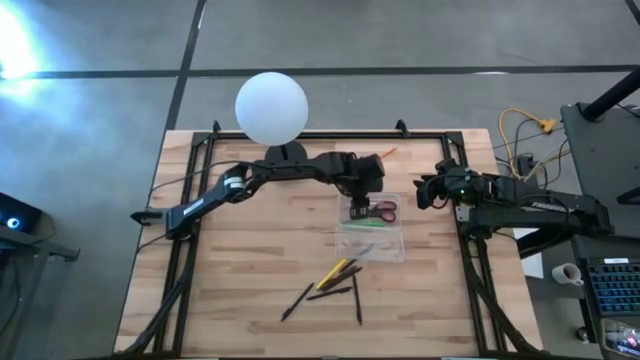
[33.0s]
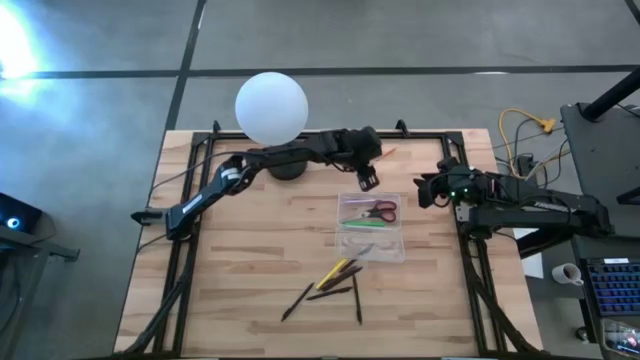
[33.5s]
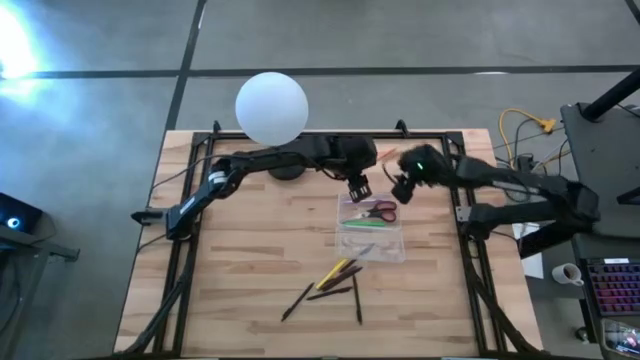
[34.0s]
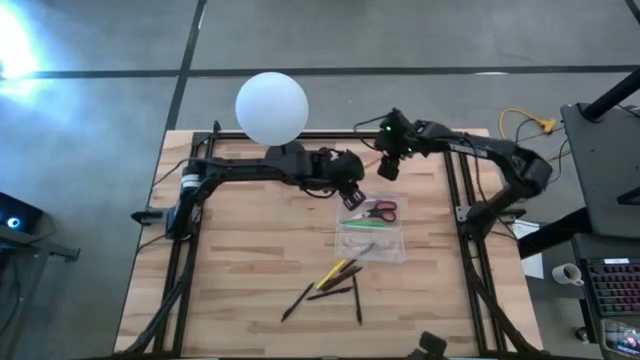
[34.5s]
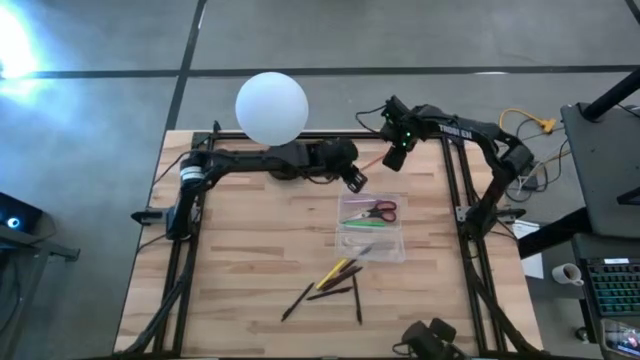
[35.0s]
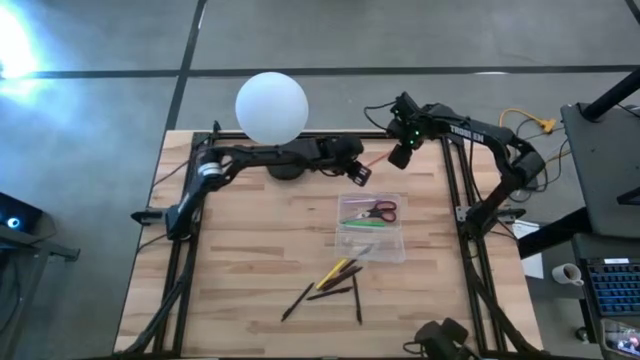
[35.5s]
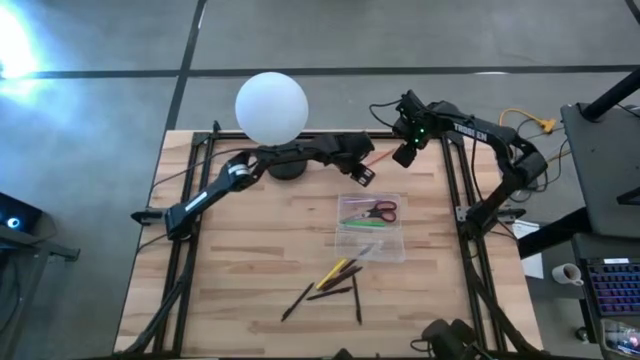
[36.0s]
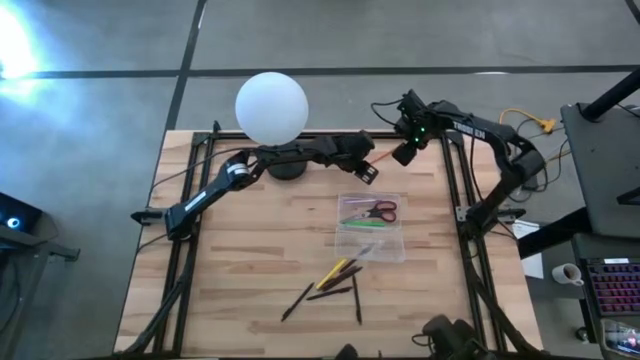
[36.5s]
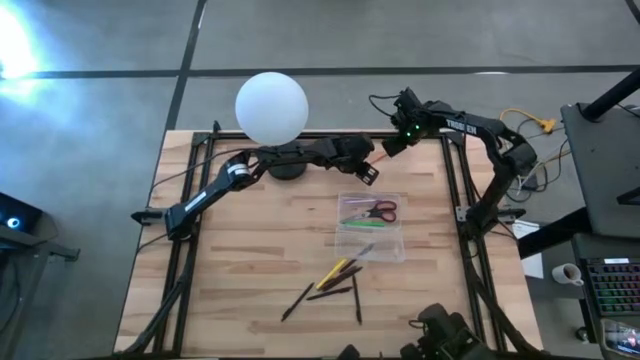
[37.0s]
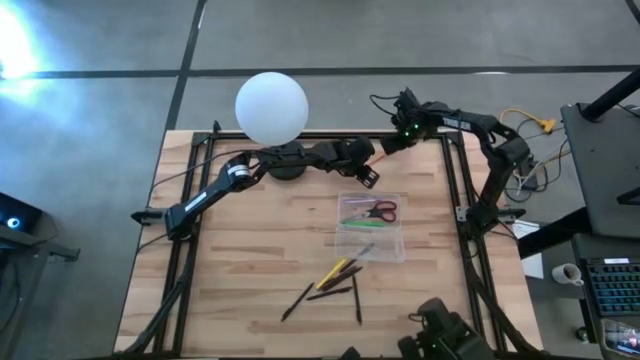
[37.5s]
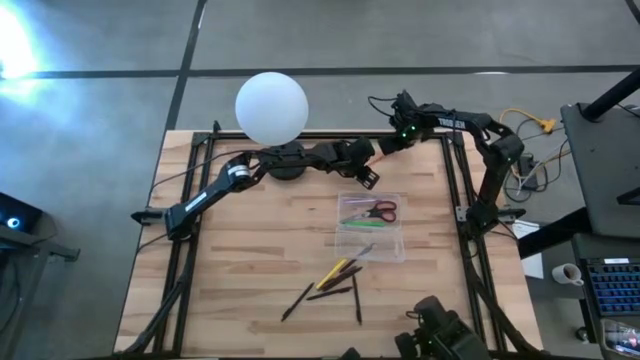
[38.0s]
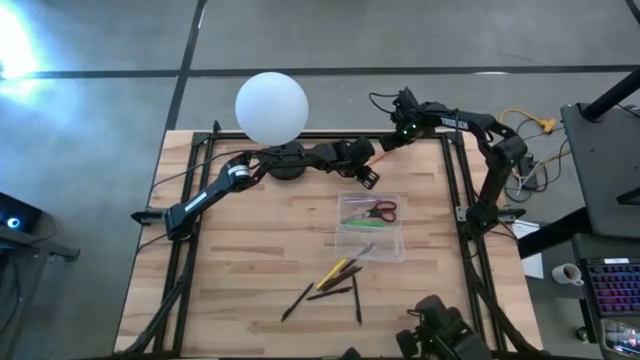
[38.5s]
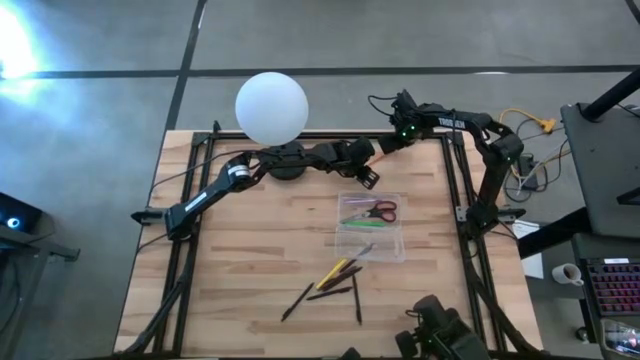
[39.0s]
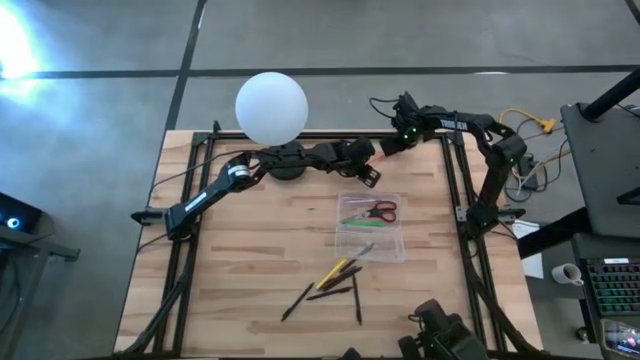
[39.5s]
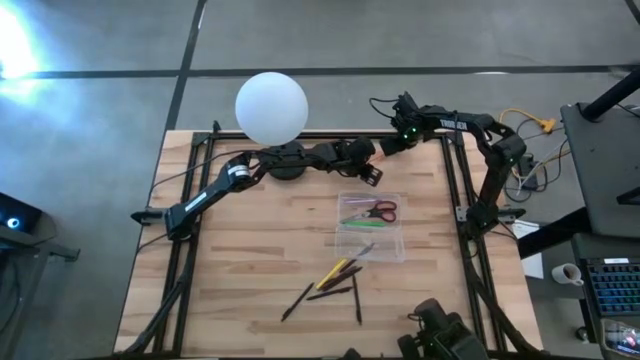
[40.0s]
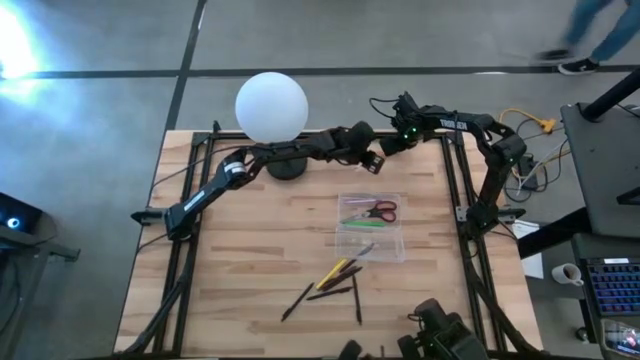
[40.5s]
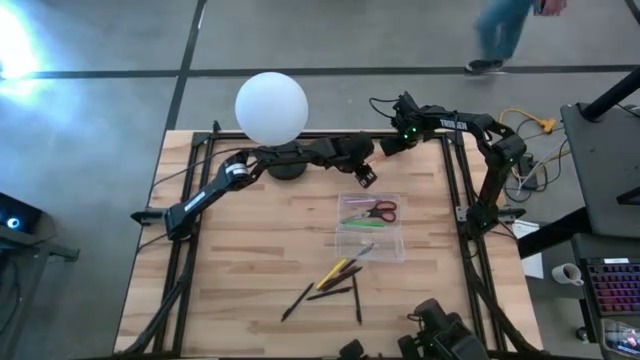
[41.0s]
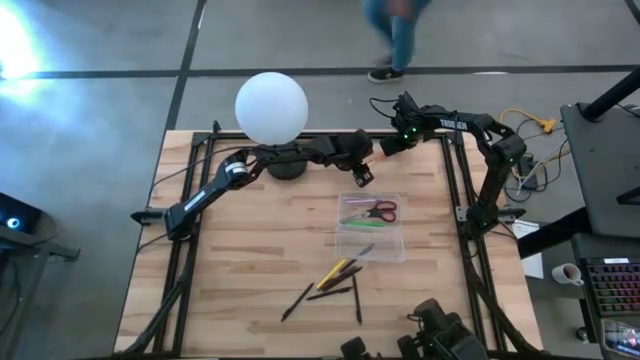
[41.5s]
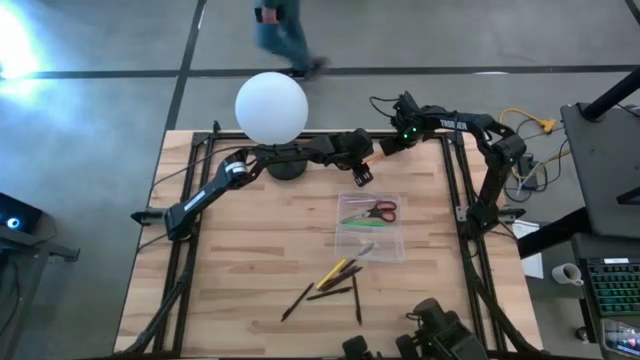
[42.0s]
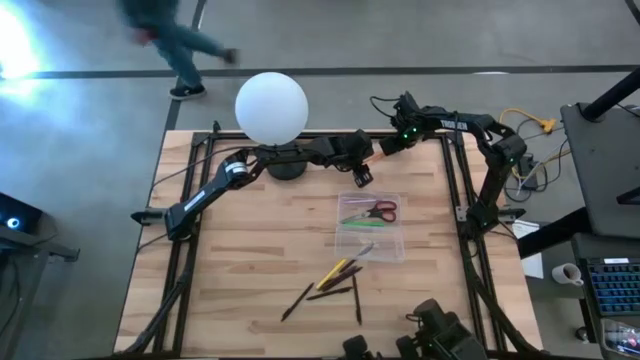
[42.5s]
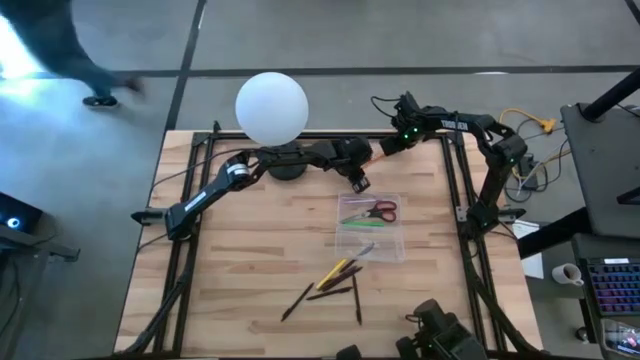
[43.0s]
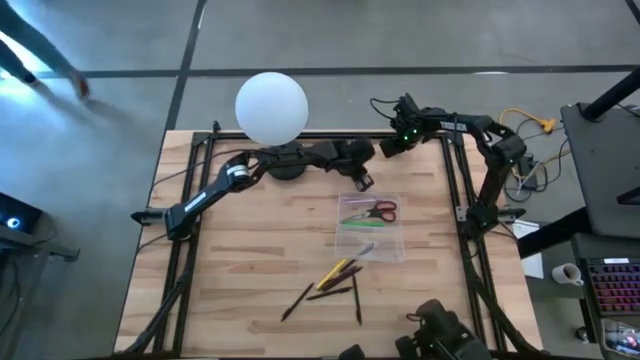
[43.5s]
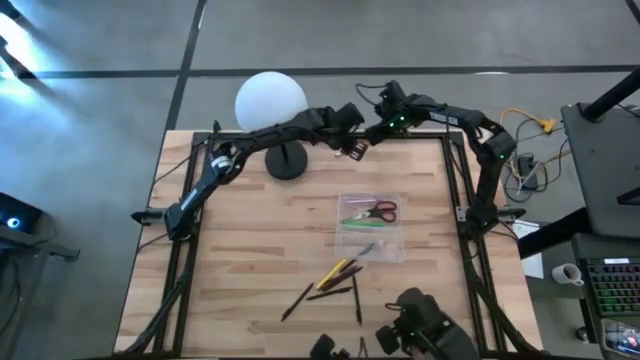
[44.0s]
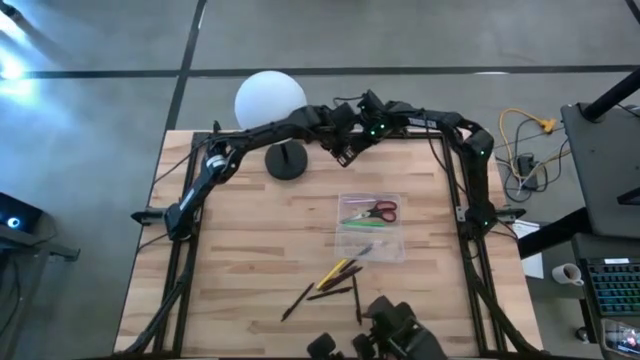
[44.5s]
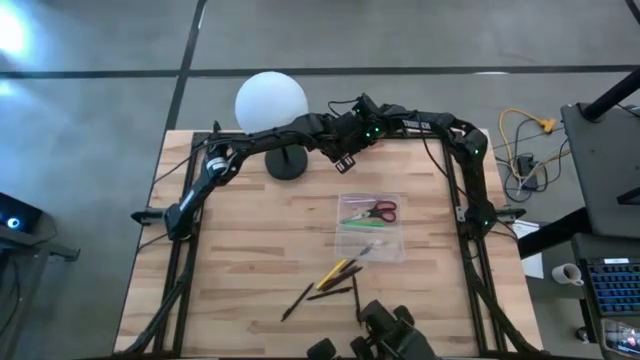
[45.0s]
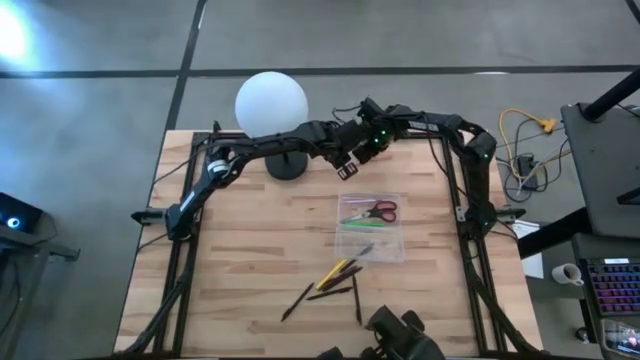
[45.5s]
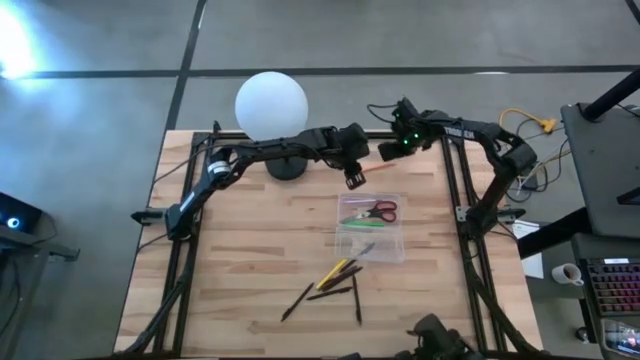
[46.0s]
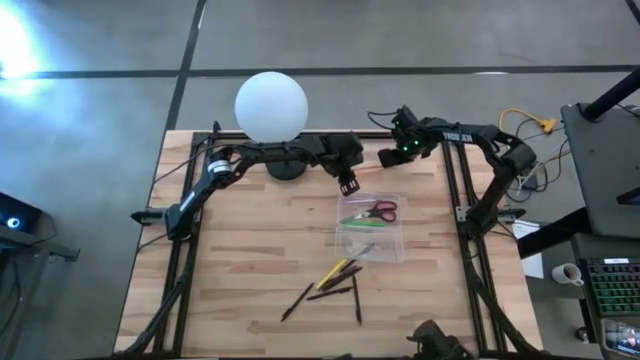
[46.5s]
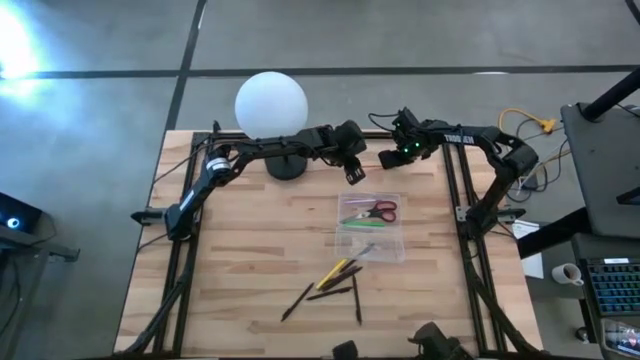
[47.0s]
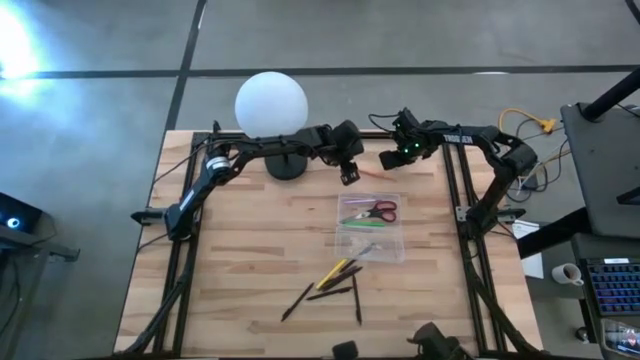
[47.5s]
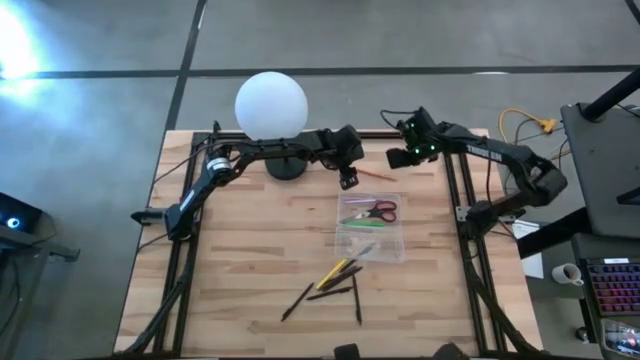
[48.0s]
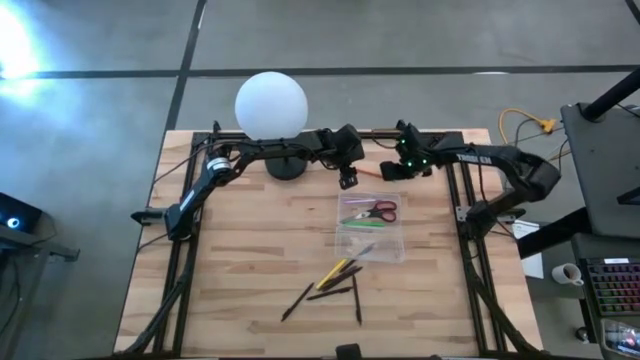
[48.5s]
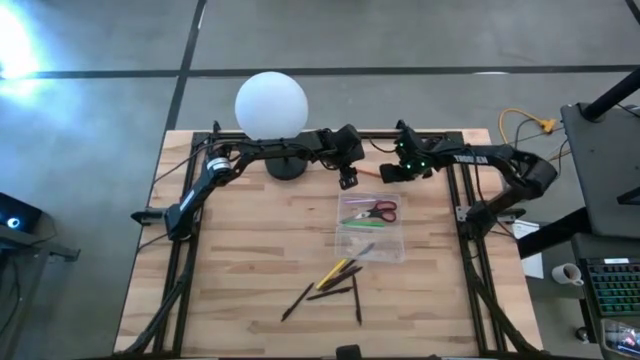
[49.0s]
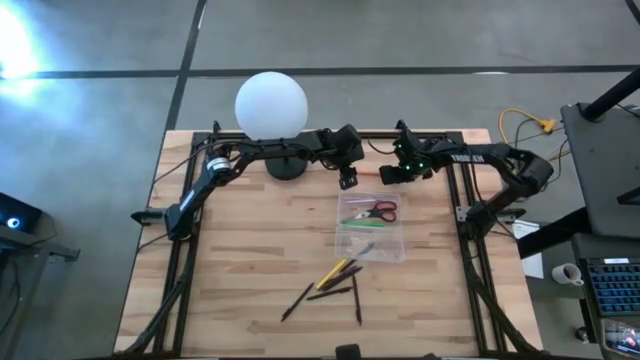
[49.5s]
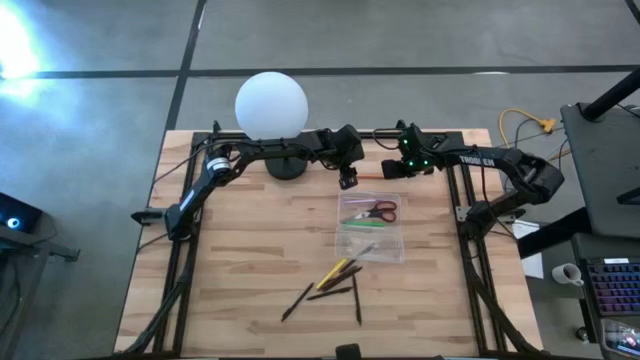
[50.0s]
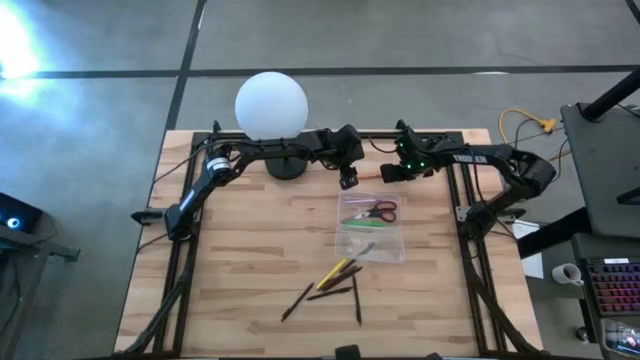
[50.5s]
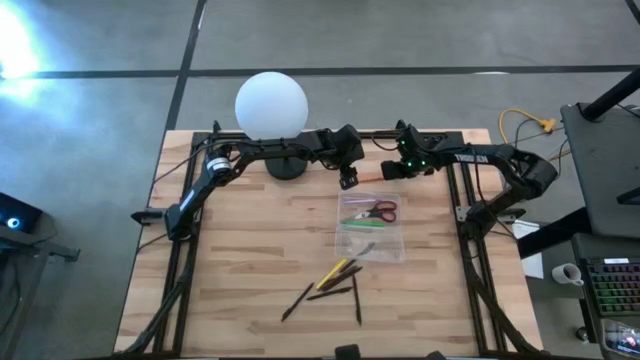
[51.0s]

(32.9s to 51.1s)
Task: Pick & place school supplies into a supply box
Put the orange pencil into the supply box
